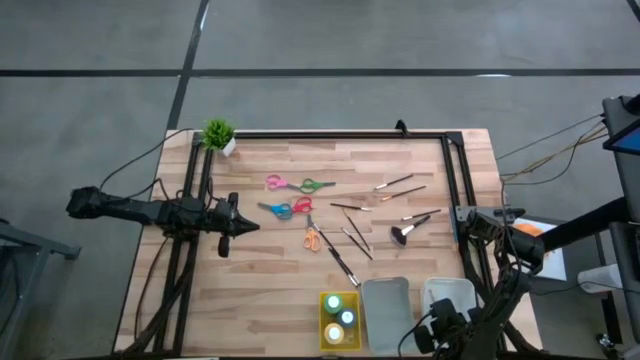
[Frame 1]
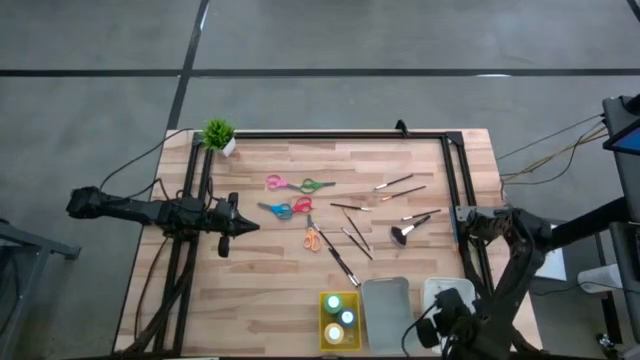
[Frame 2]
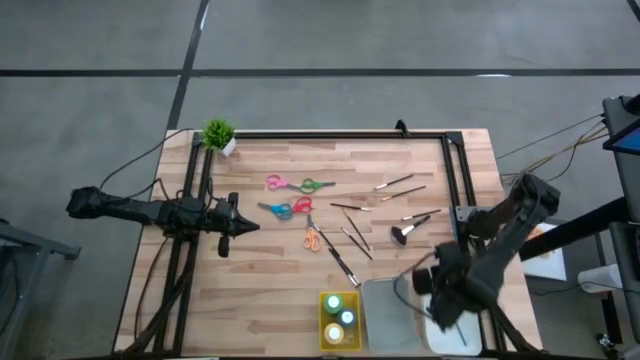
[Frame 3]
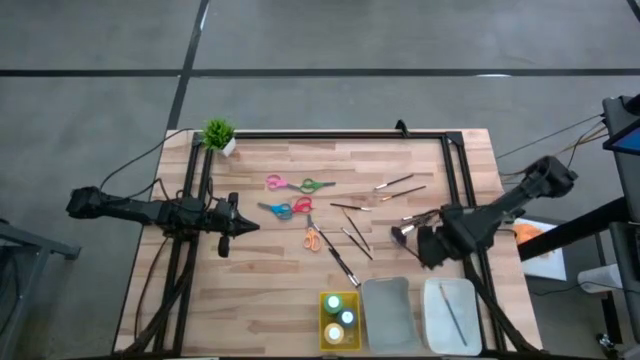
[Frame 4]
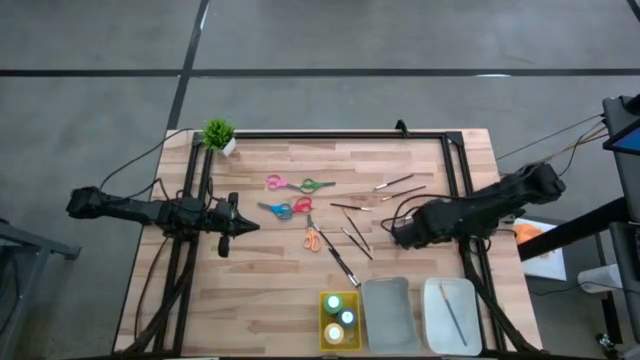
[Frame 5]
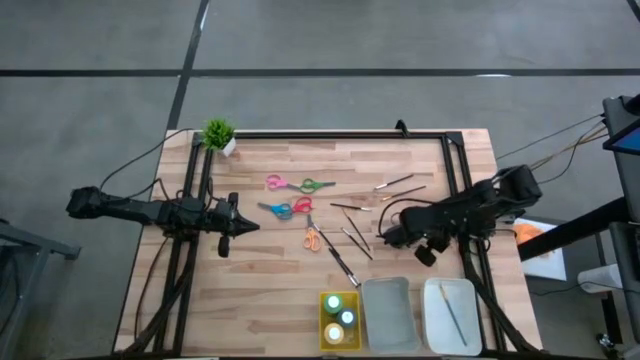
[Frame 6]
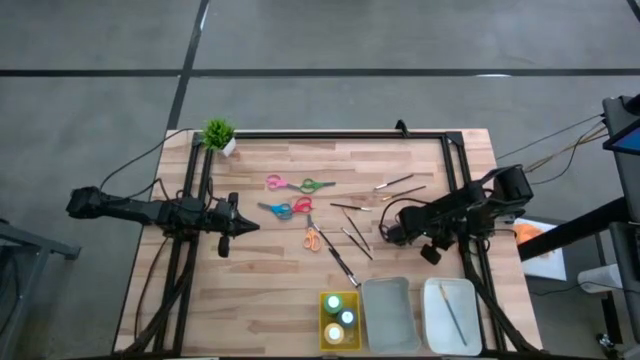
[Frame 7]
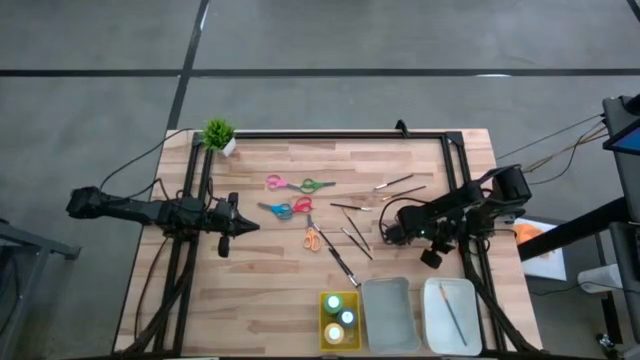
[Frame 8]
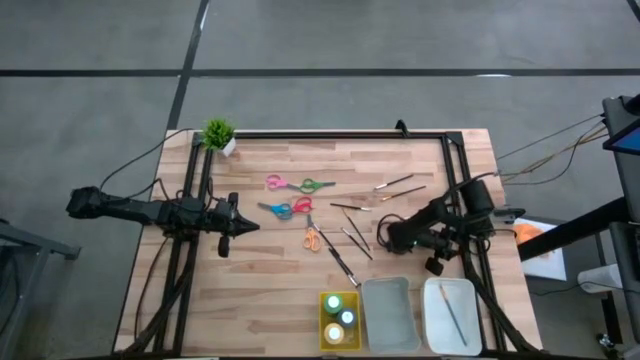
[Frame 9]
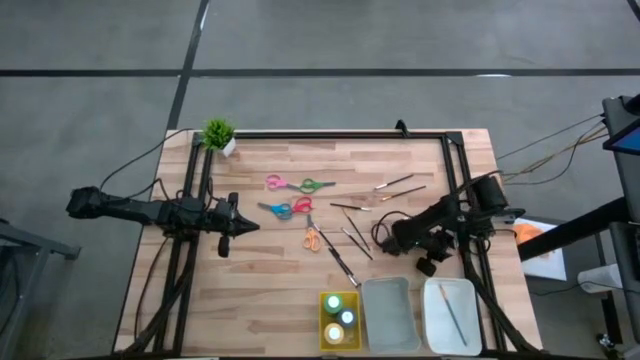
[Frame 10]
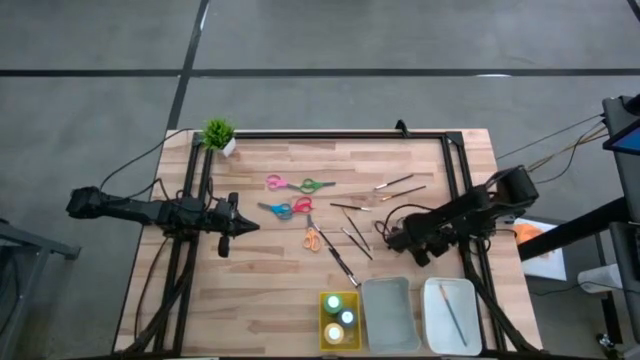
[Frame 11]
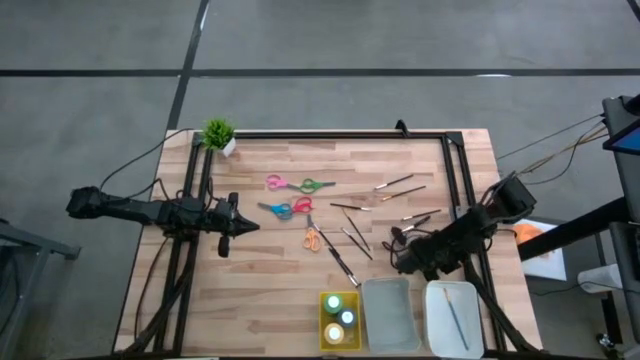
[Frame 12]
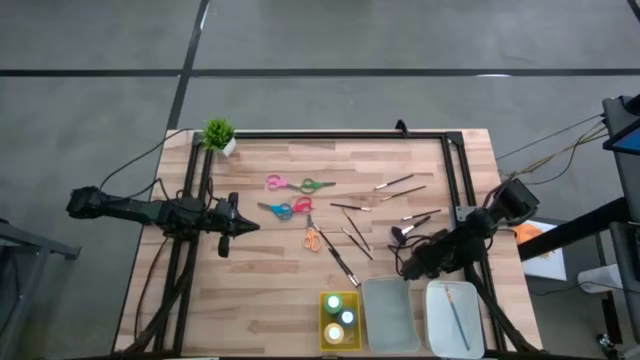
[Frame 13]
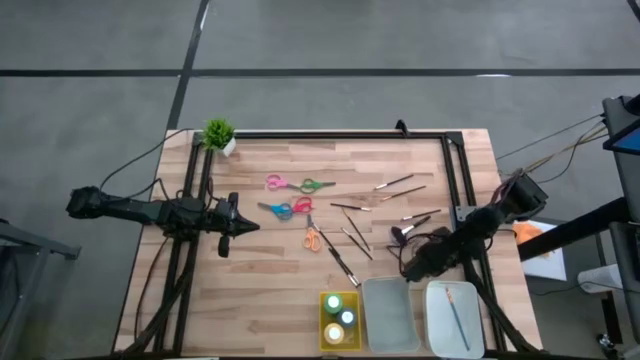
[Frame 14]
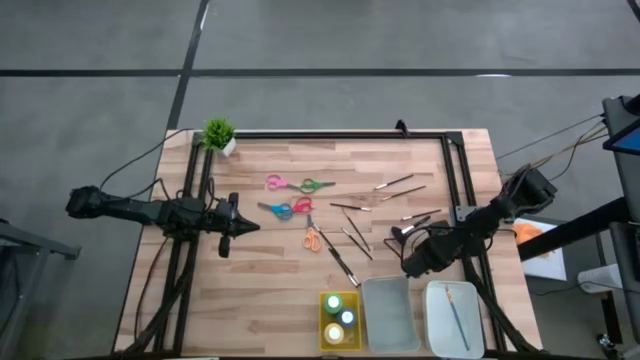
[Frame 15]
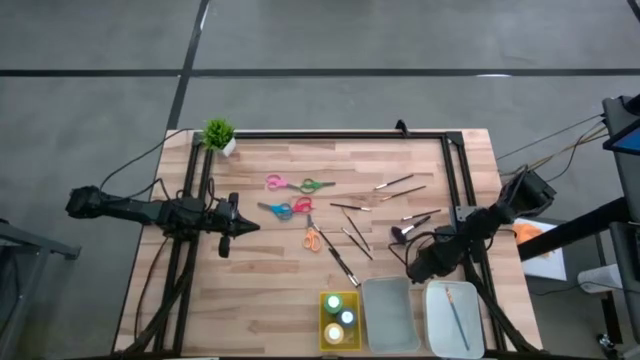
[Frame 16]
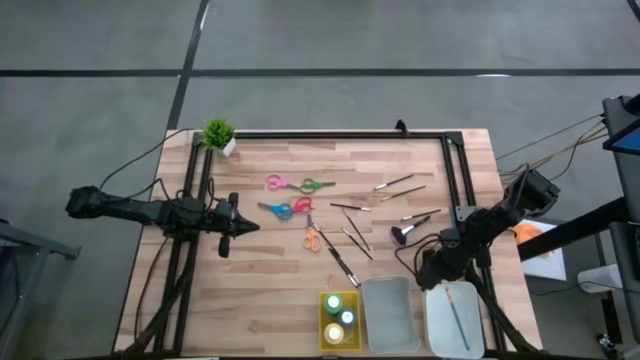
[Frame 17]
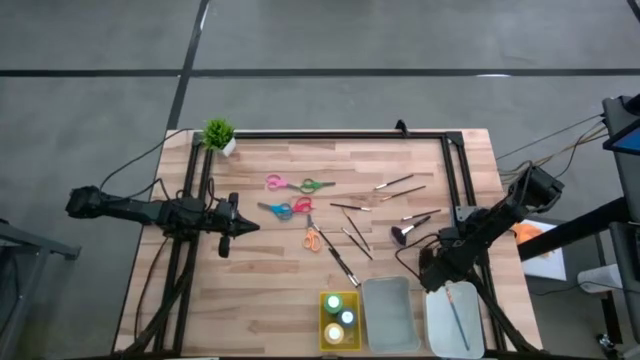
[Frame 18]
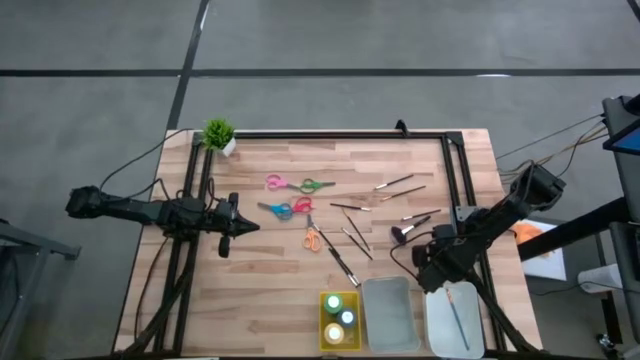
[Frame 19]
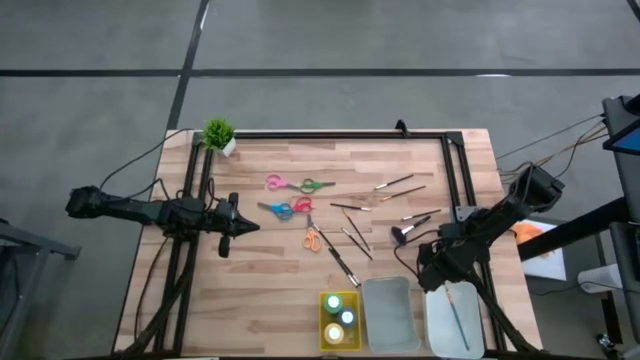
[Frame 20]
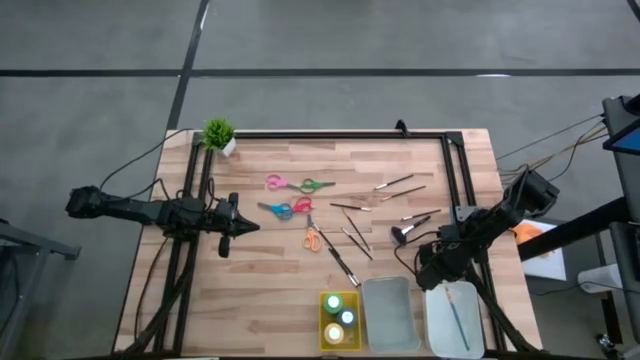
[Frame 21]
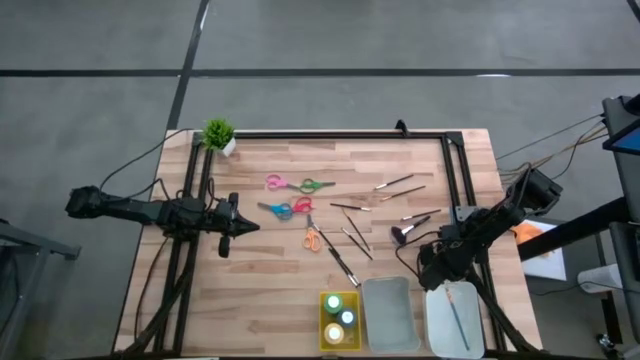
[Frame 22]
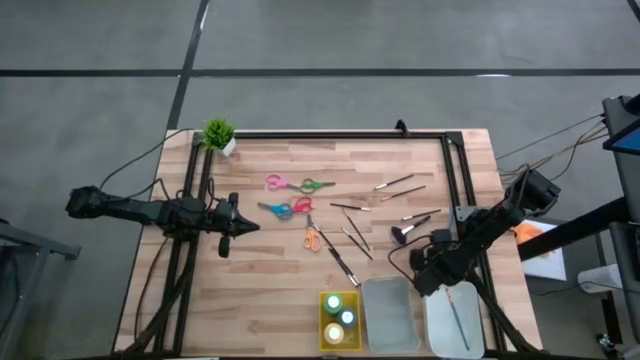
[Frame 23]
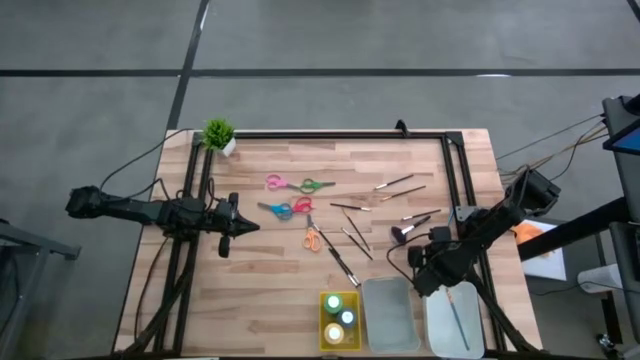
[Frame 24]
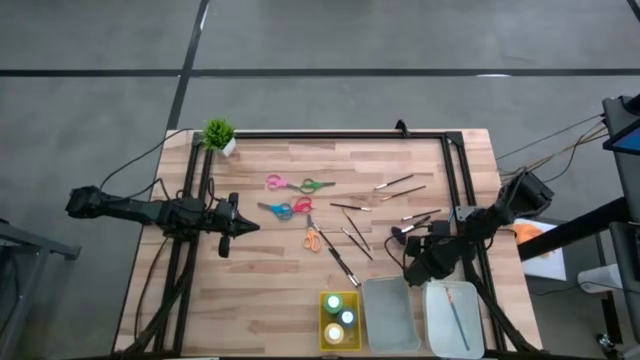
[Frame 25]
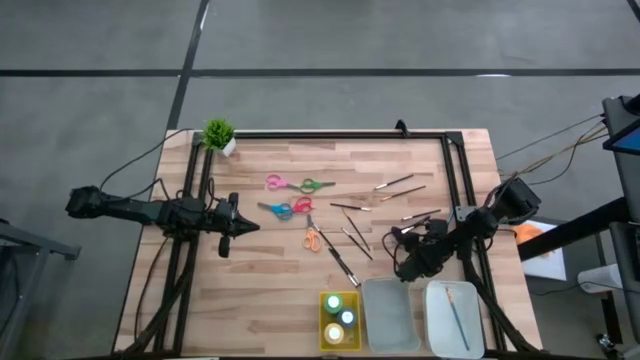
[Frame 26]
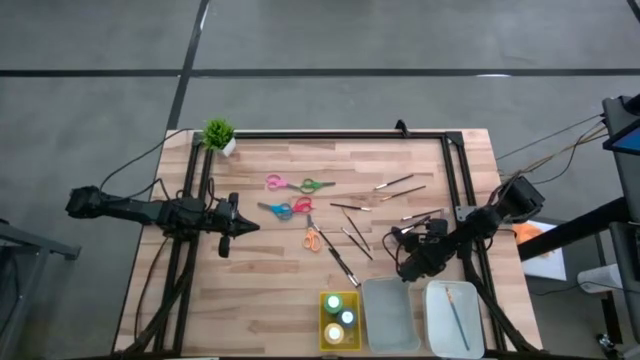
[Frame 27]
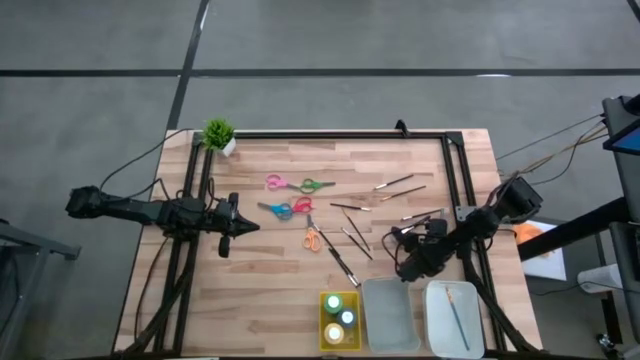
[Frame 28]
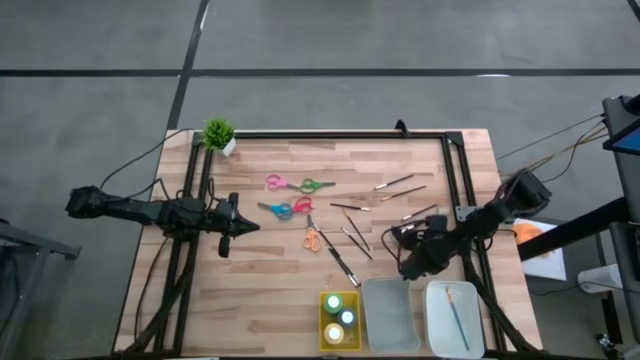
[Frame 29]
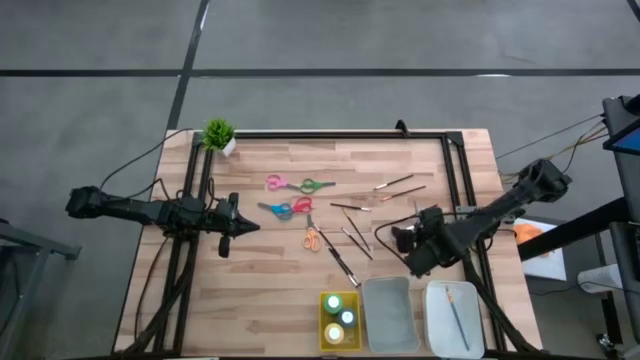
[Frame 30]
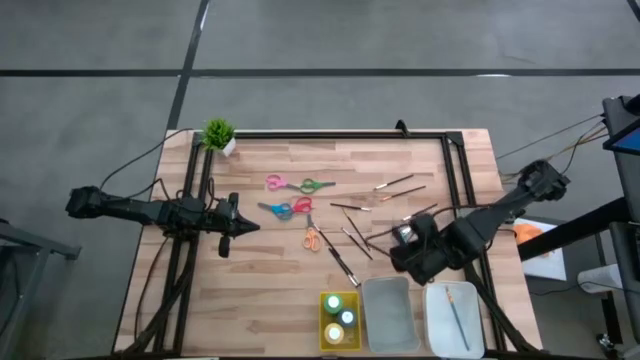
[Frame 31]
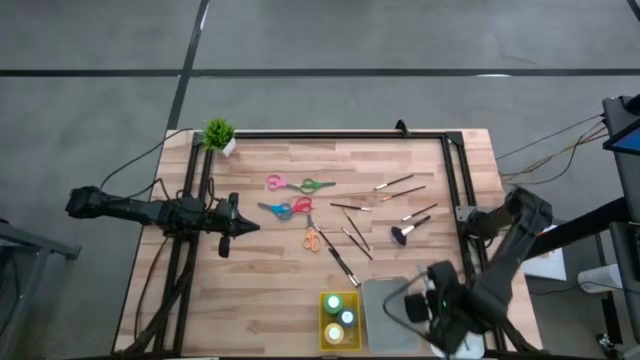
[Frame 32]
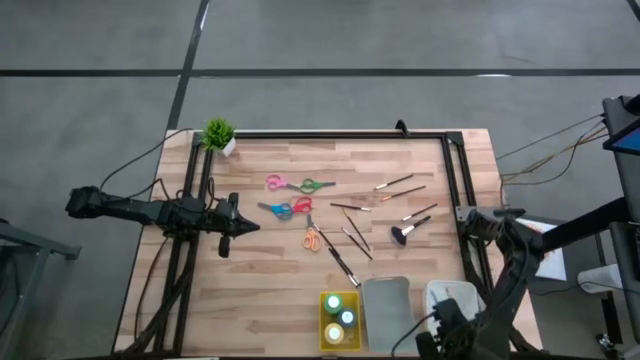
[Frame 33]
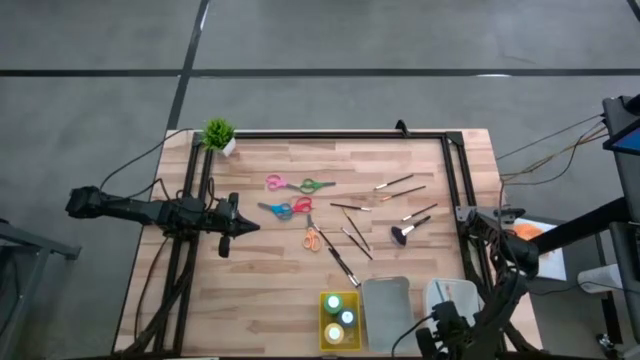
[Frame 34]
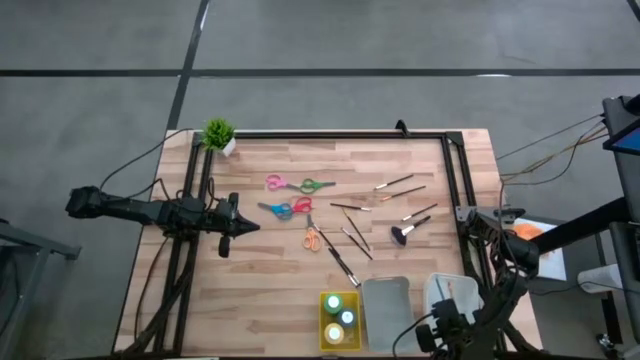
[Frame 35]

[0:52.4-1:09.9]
Task: Pick & Place Paint Supplies
Put the blue paint brush into the white bin
